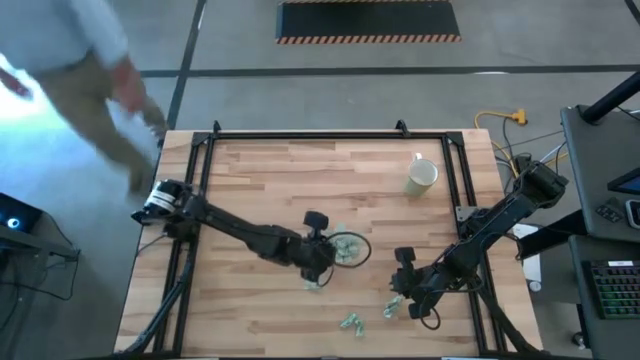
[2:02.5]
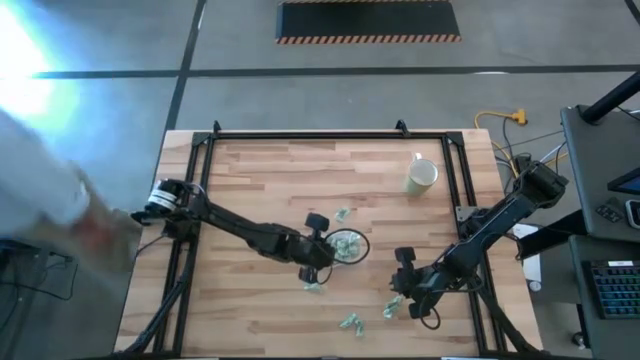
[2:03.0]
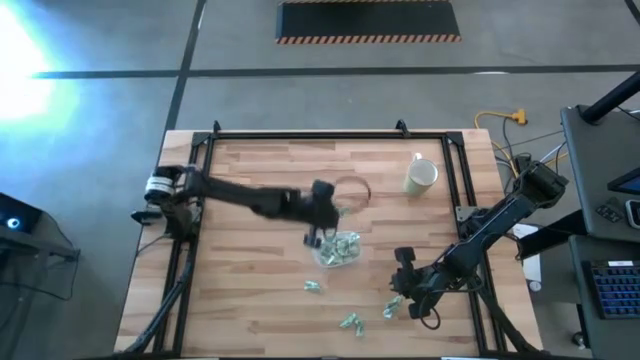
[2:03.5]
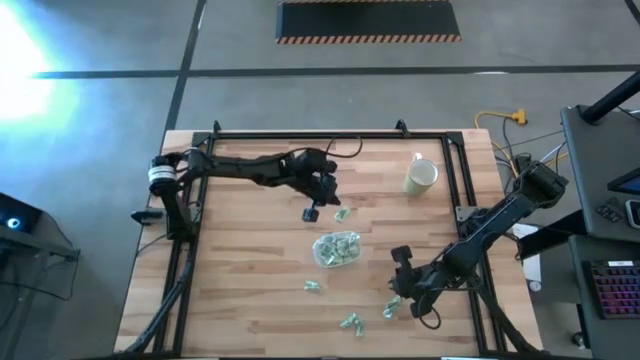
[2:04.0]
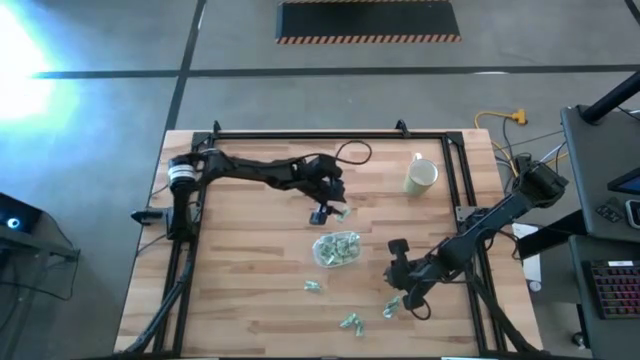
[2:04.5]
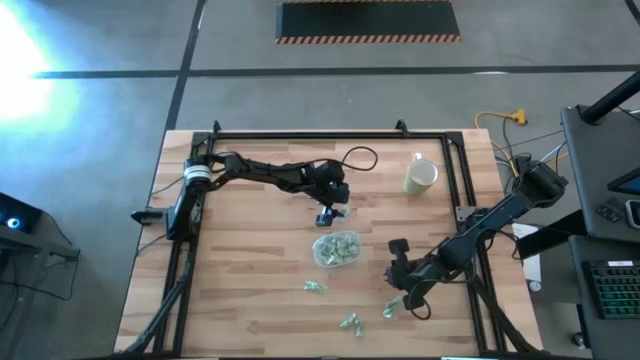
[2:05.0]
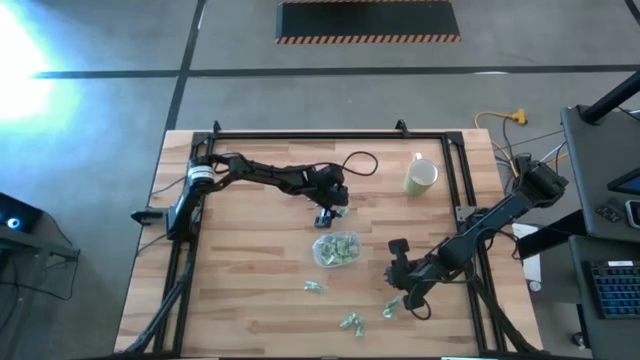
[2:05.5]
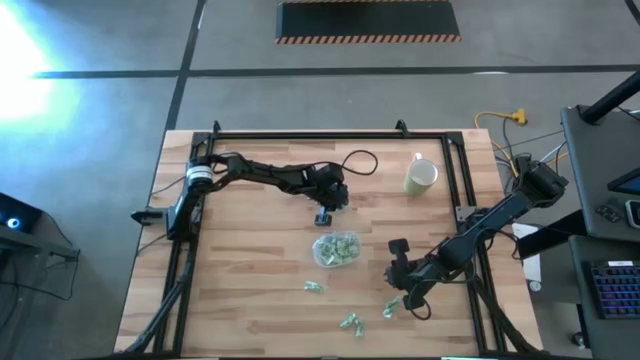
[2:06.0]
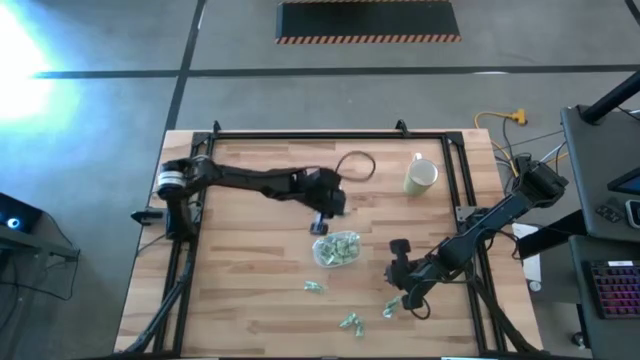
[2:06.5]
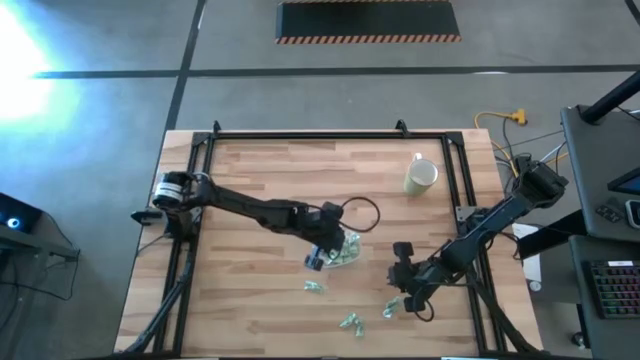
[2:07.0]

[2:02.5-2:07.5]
Task: Pick and place items into bin
Put the Stevia packet into the transparent bin

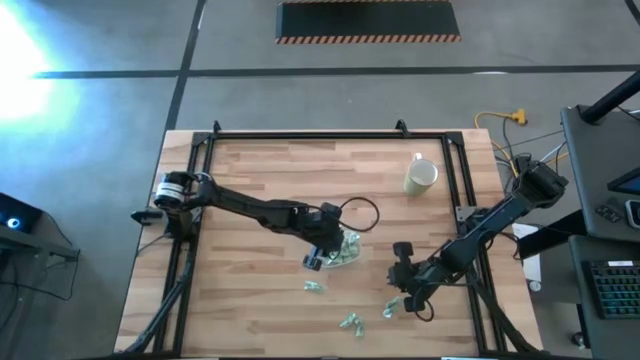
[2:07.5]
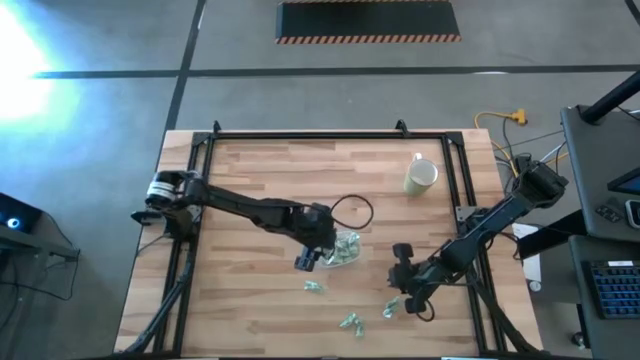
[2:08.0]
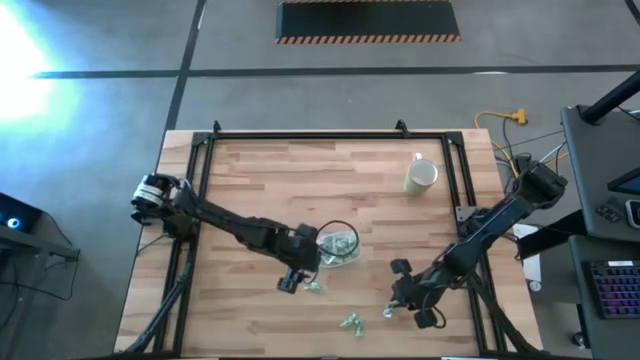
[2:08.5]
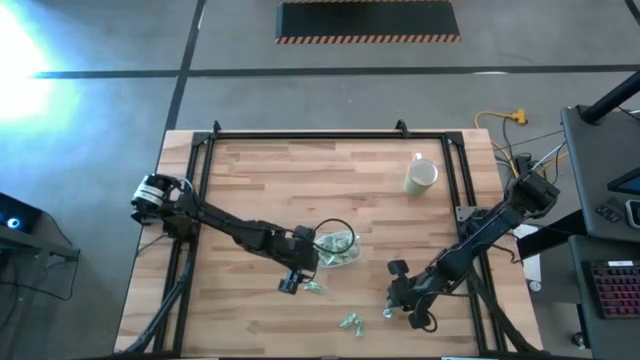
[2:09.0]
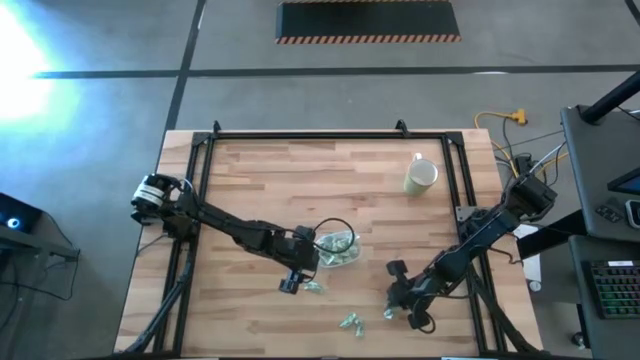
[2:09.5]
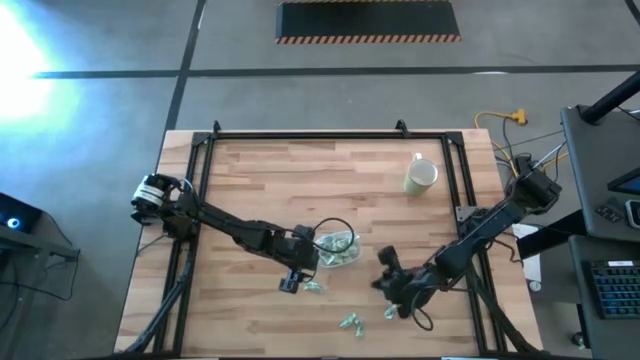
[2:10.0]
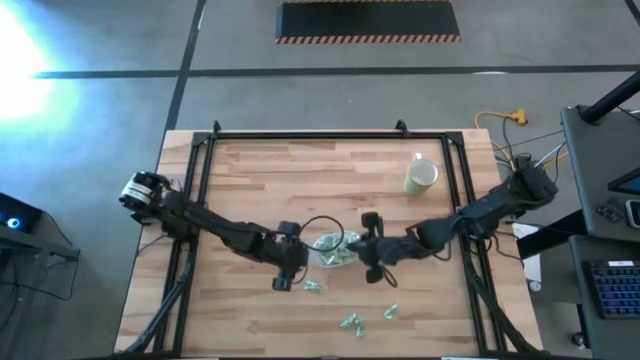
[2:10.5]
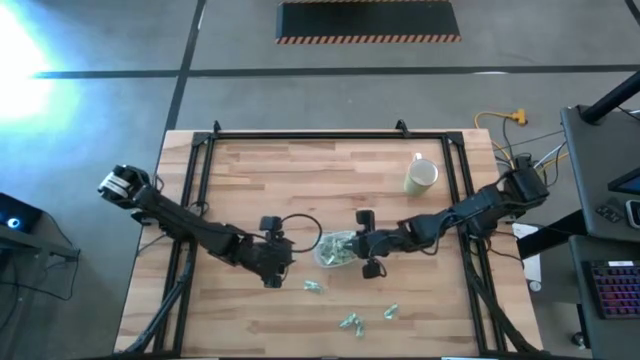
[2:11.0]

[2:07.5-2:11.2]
Put the Stevia packet into the transparent bin

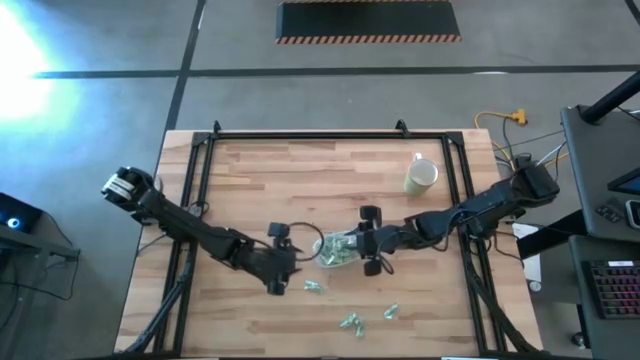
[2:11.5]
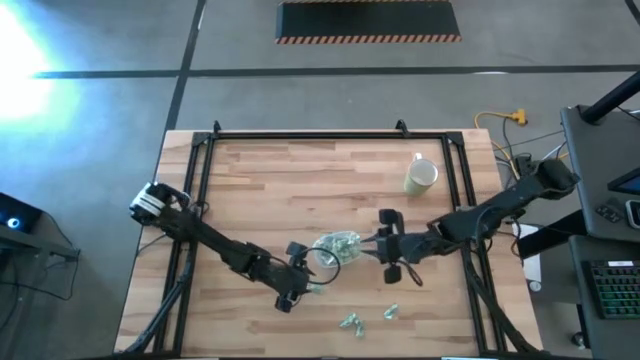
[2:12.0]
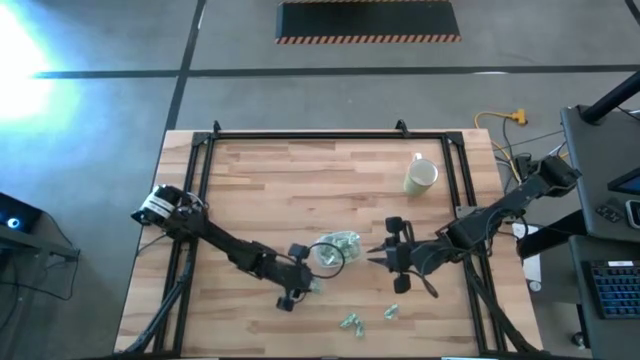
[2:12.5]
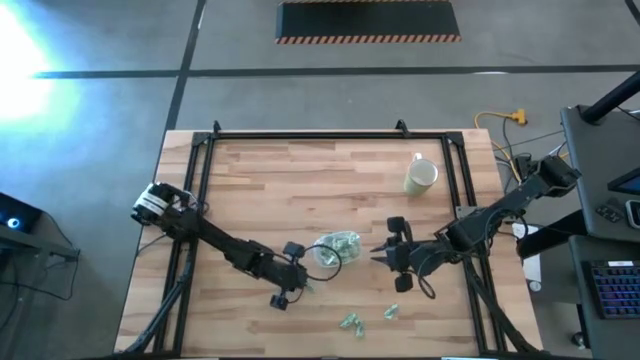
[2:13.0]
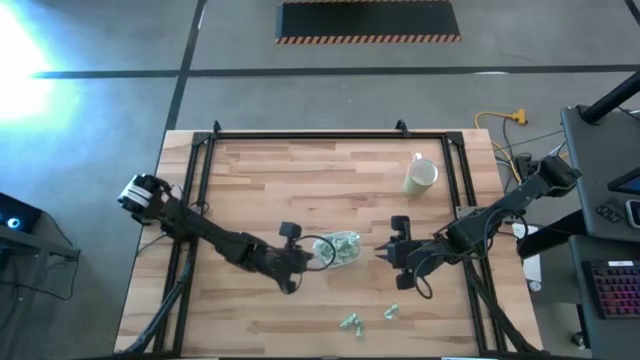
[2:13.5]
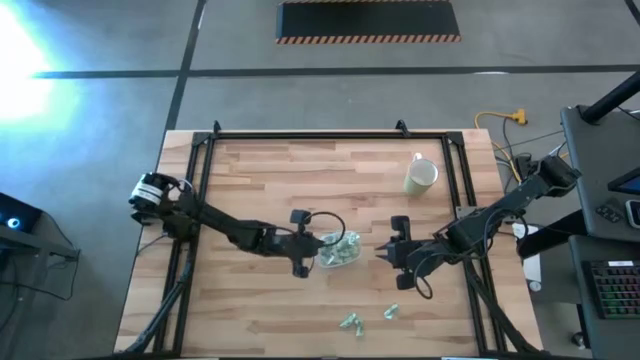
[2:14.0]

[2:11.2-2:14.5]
Put the Stevia packet into the transparent bin

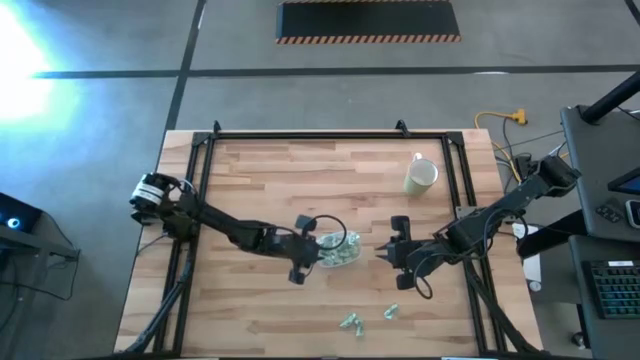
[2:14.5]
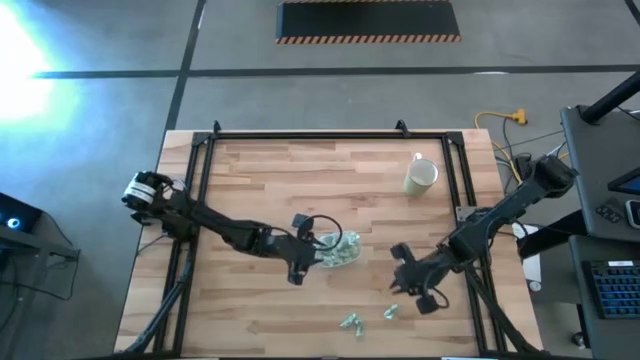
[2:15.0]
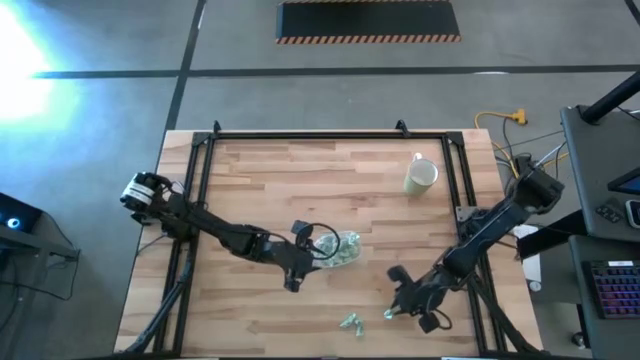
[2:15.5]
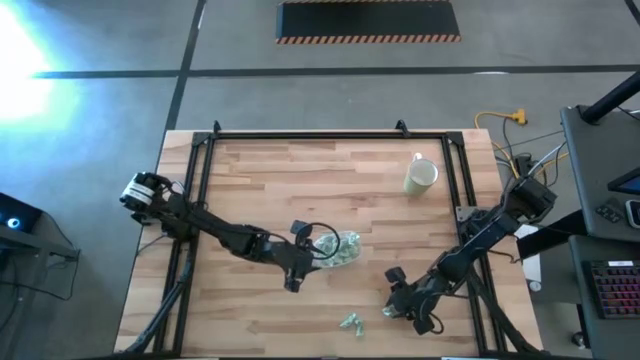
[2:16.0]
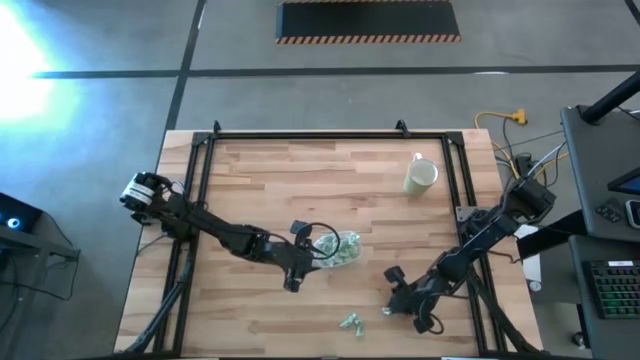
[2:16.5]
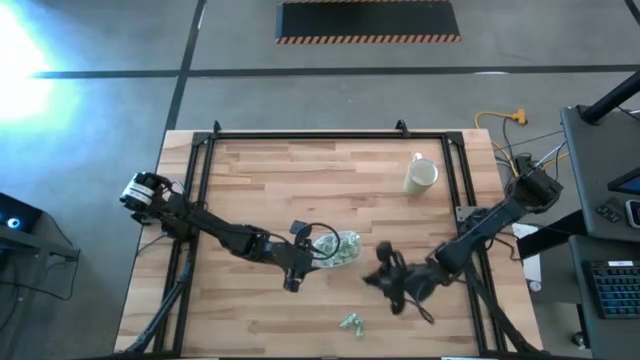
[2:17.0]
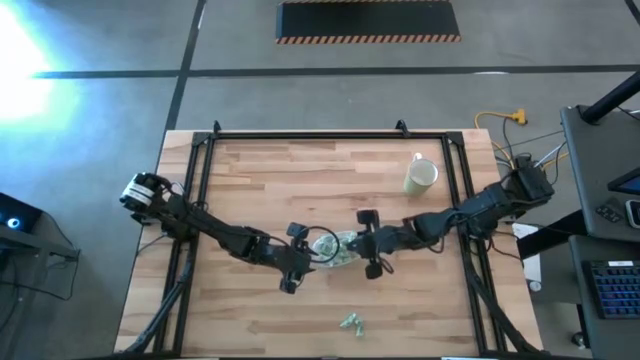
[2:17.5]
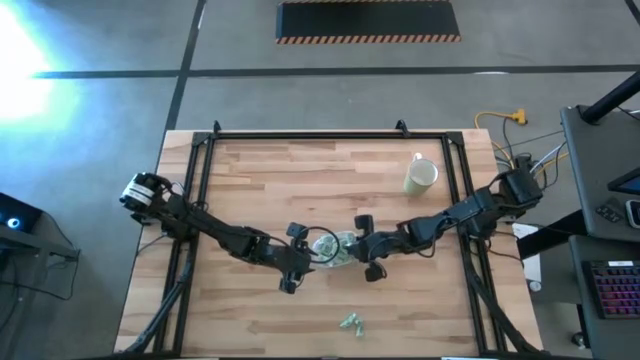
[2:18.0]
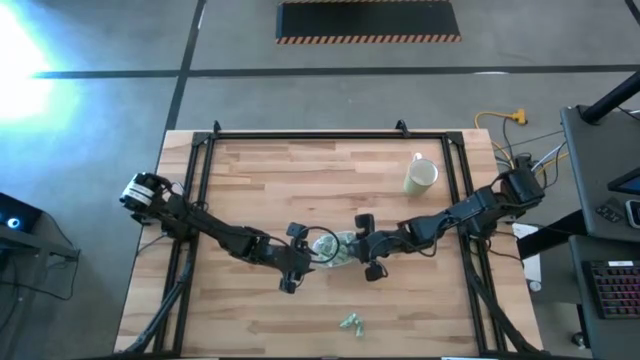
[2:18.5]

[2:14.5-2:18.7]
Put the Stevia packet into the transparent bin

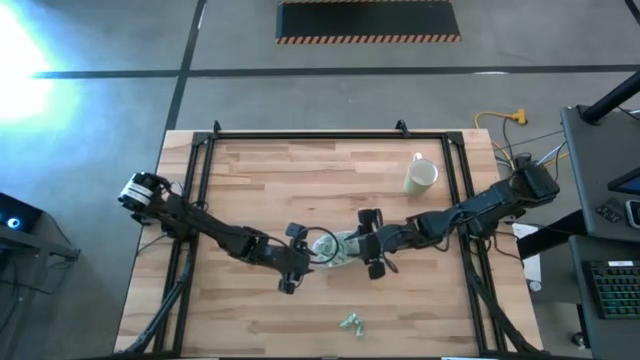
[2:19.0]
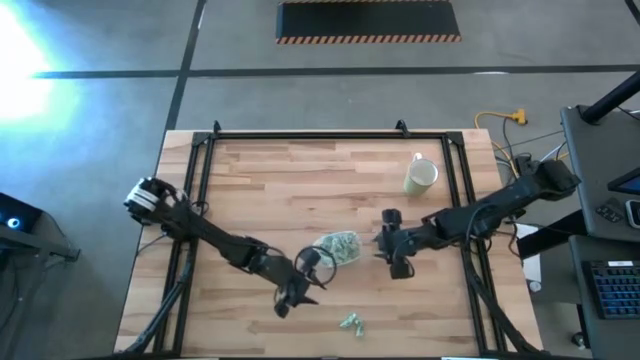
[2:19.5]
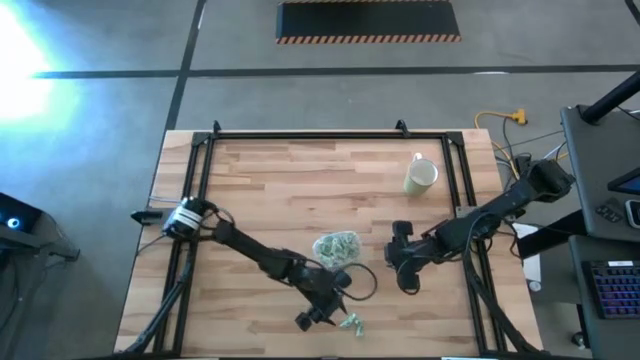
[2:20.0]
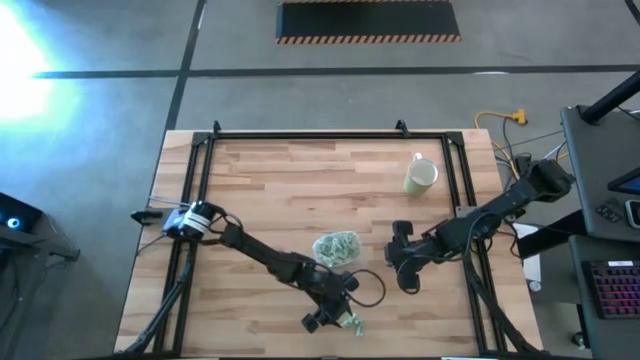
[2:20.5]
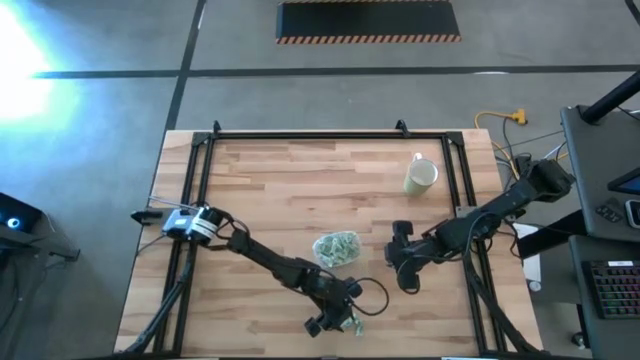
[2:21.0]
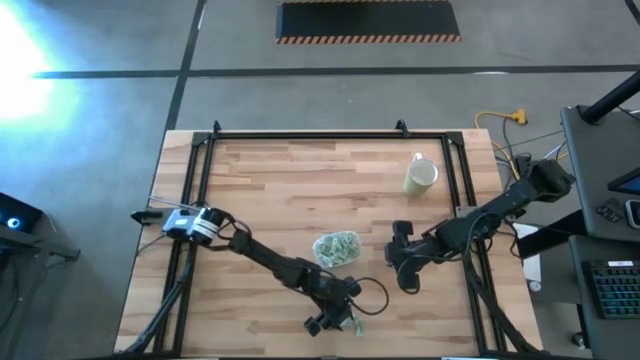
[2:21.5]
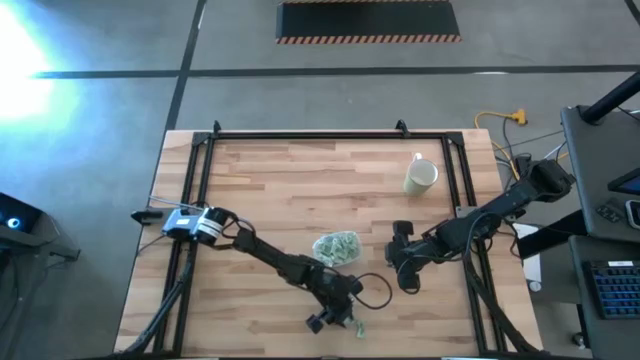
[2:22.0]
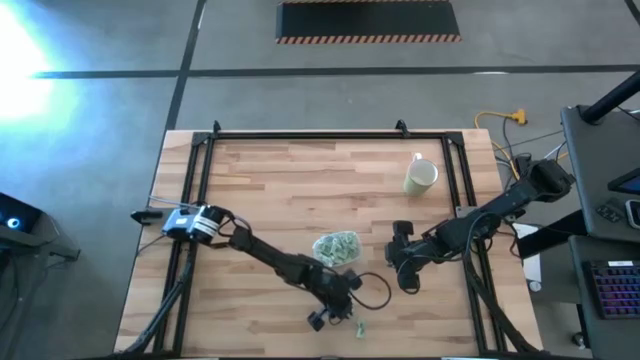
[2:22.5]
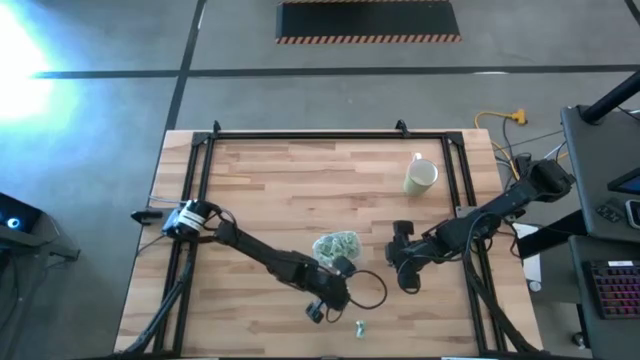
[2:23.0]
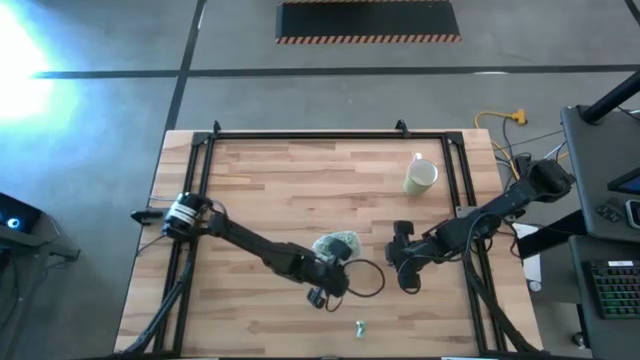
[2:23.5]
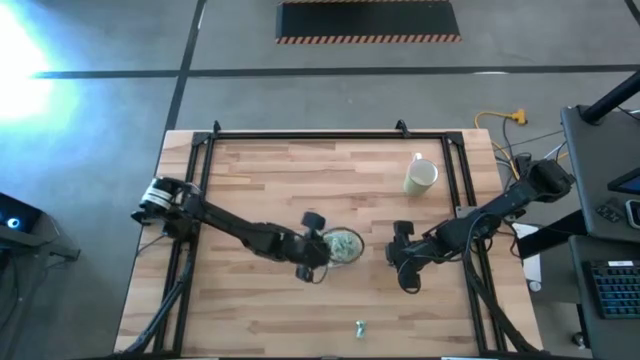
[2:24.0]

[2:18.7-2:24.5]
Put the Stevia packet into the transparent bin
